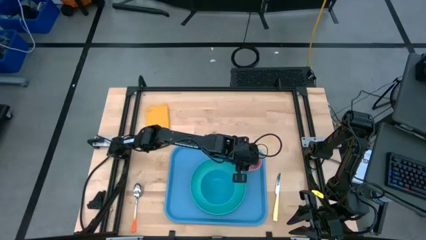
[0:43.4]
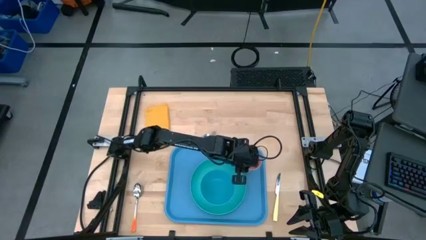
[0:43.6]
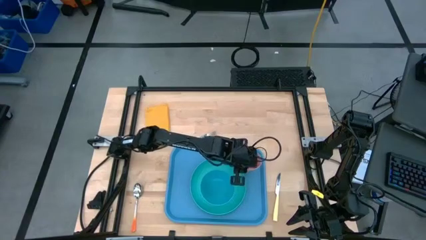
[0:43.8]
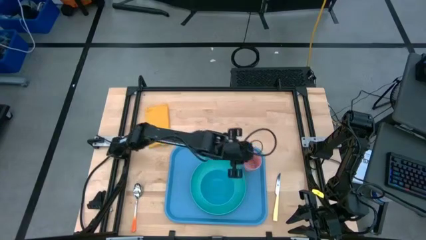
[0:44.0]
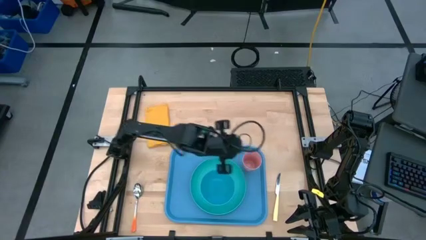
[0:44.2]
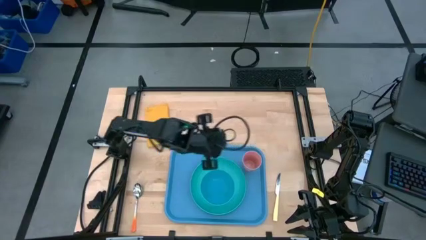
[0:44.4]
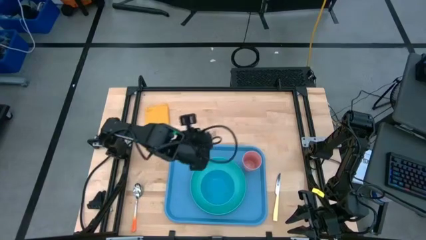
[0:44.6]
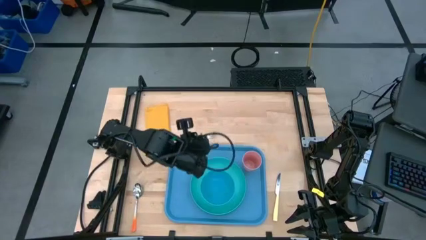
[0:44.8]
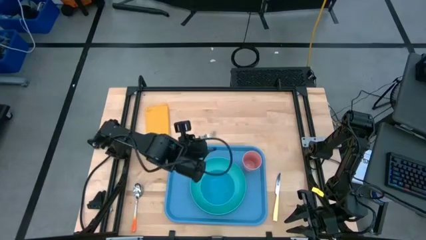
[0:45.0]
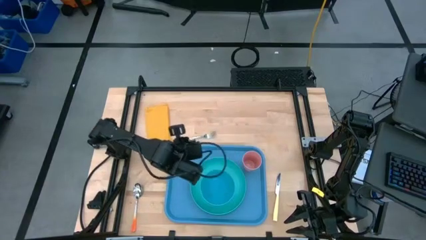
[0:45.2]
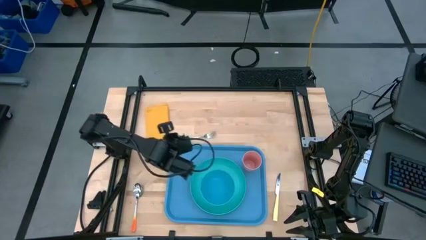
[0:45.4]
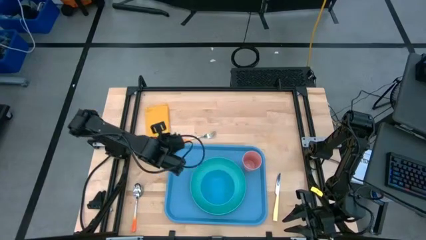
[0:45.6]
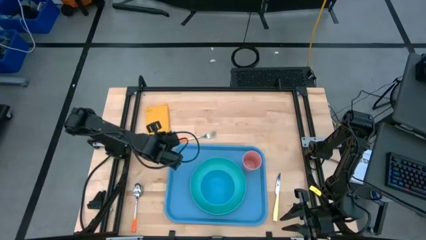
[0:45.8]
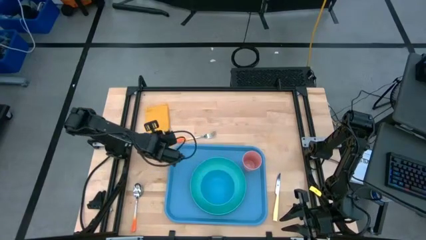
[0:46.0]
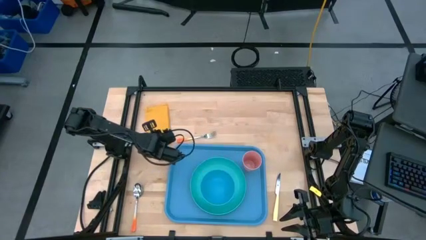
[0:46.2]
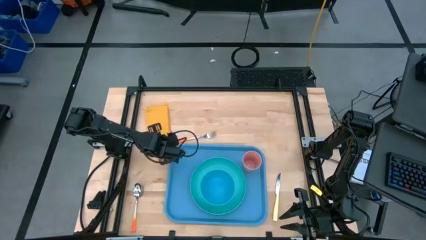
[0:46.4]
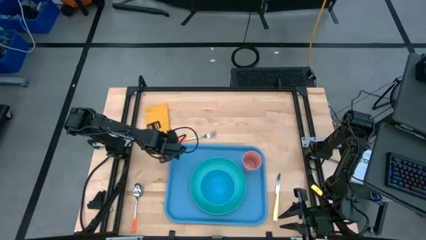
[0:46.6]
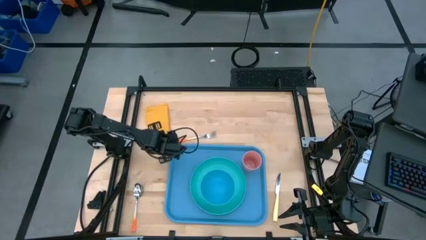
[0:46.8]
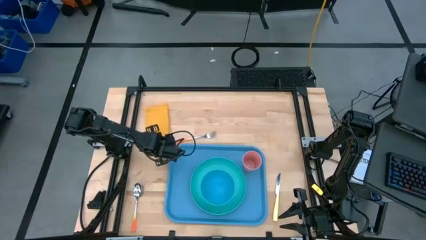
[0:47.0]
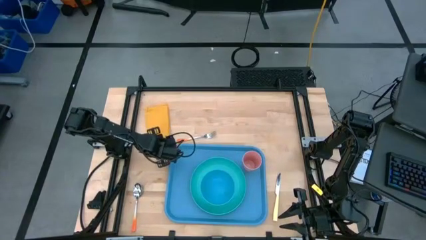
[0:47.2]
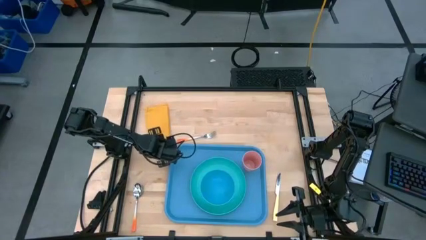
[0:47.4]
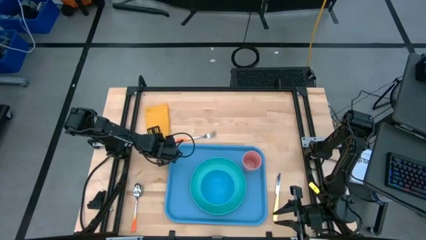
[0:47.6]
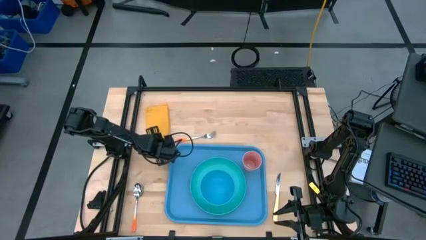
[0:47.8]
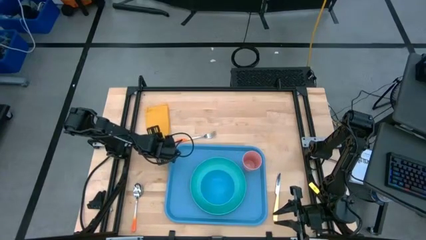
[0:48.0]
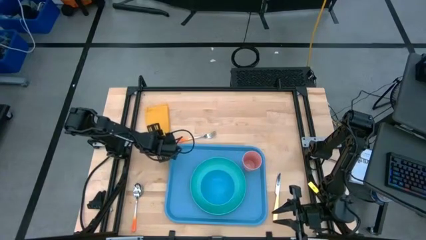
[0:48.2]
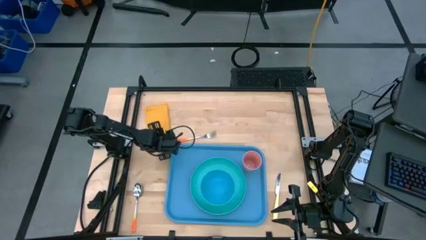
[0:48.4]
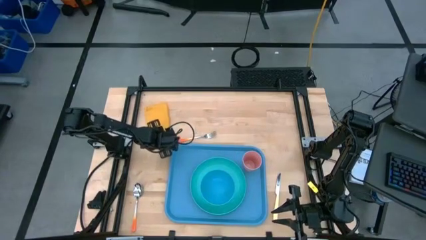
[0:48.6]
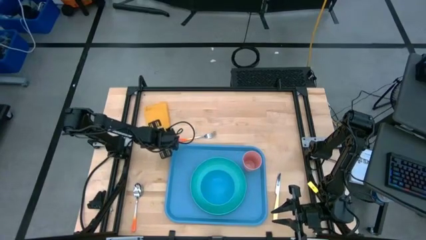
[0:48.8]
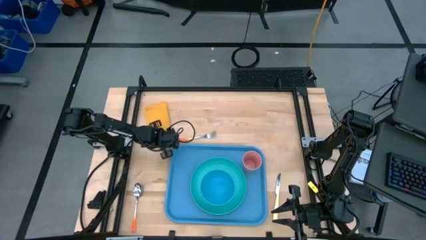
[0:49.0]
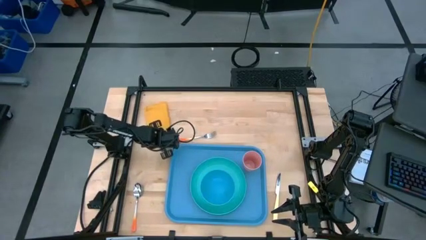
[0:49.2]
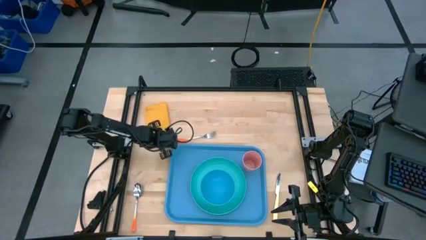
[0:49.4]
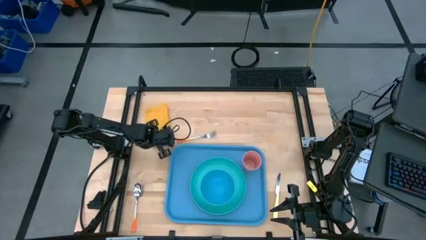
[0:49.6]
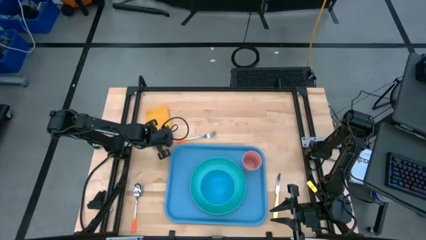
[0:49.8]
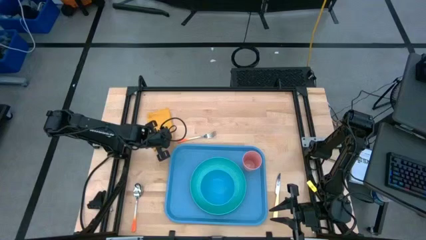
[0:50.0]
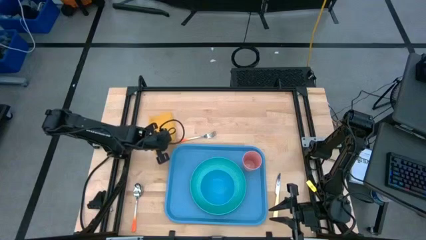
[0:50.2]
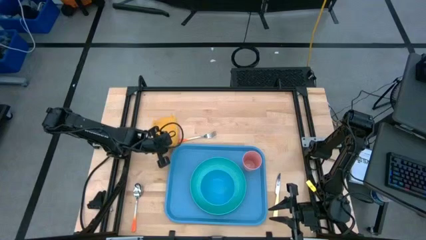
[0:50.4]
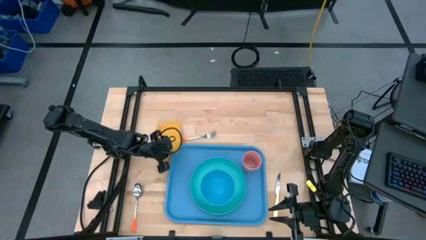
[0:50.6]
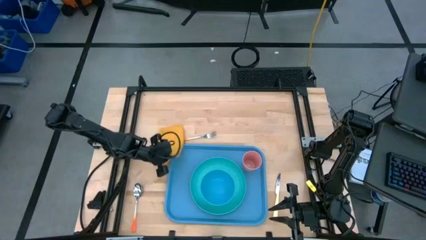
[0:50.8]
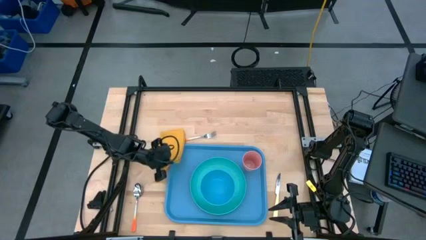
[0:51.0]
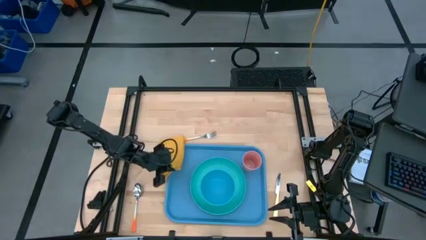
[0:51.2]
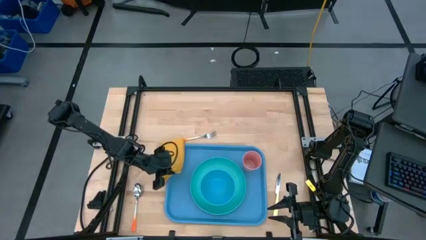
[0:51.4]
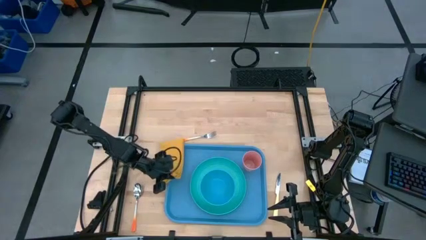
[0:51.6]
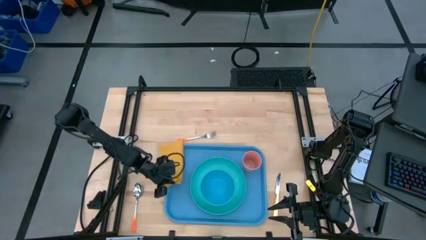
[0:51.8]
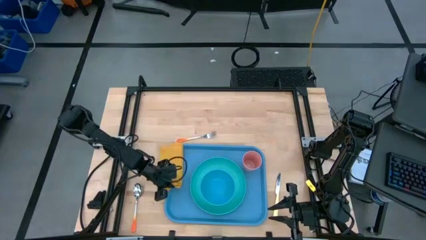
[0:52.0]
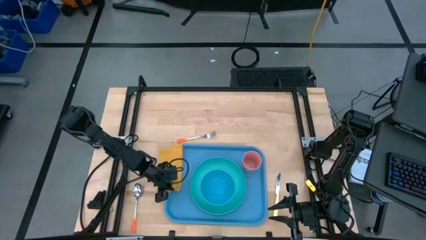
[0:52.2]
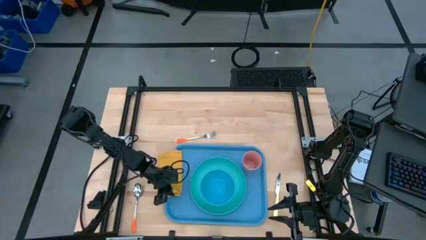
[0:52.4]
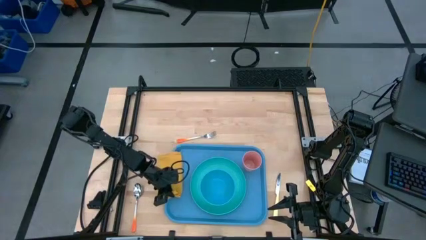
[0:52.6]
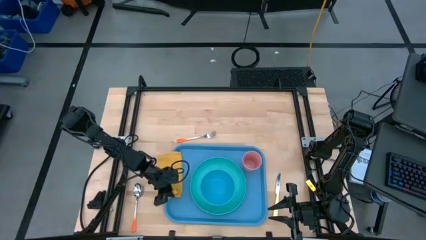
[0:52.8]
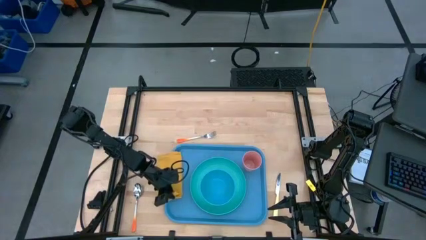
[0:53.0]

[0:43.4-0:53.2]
Task: Set up tray
Put the yellow napkin on the blue serving tray to the left of the light blue plate

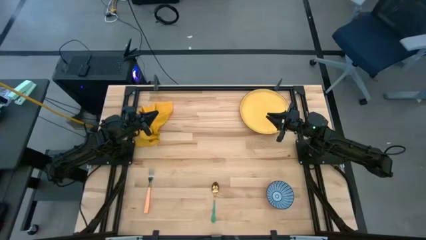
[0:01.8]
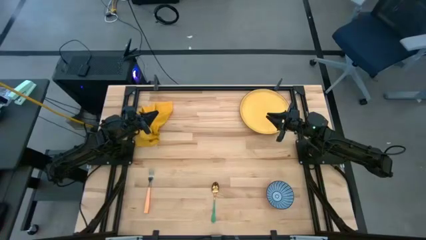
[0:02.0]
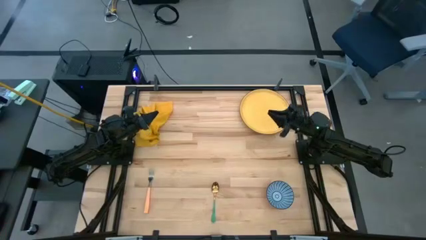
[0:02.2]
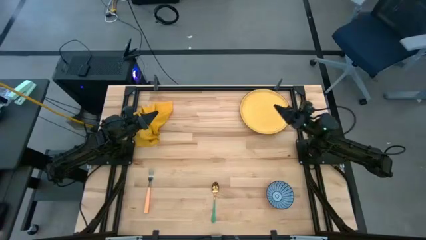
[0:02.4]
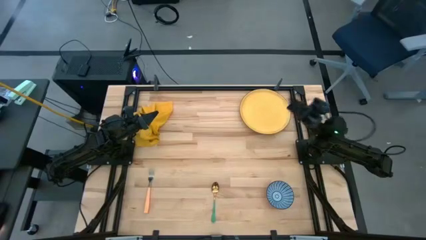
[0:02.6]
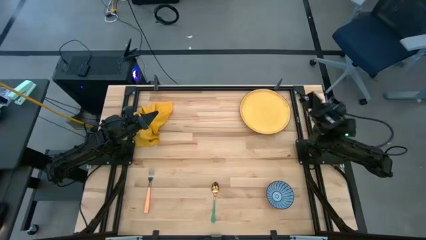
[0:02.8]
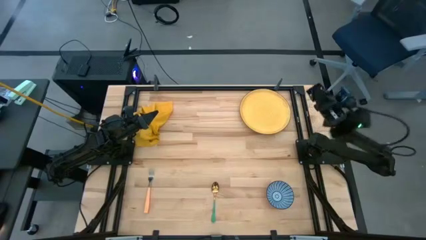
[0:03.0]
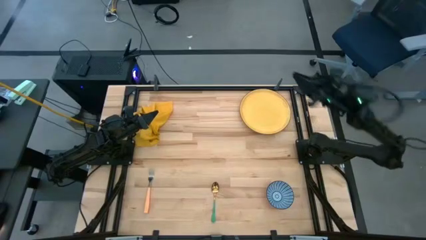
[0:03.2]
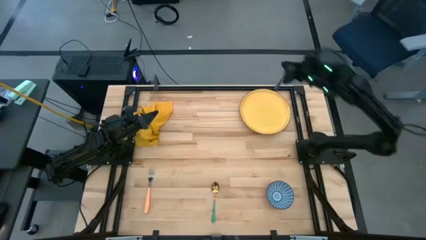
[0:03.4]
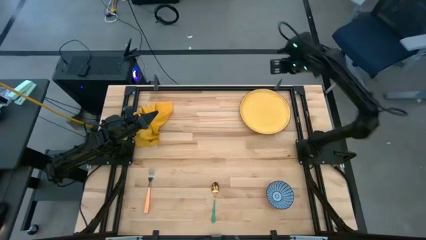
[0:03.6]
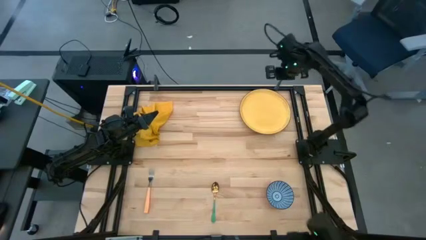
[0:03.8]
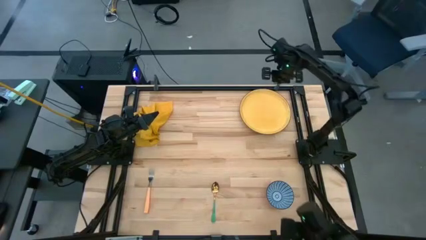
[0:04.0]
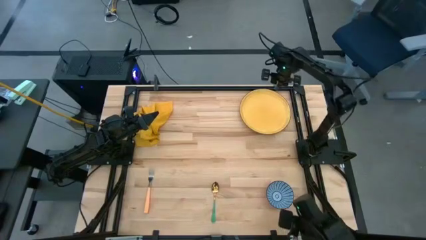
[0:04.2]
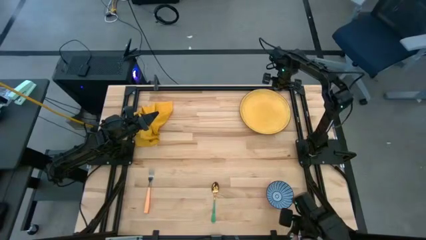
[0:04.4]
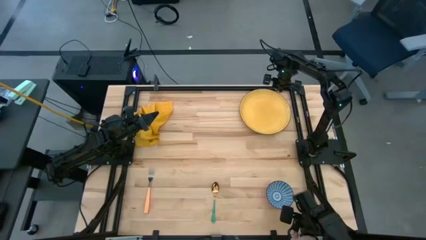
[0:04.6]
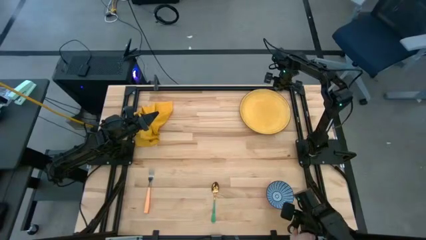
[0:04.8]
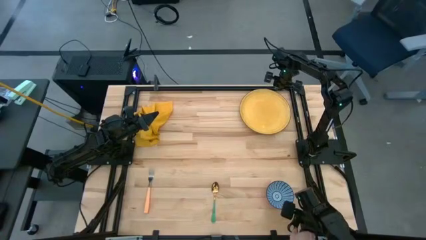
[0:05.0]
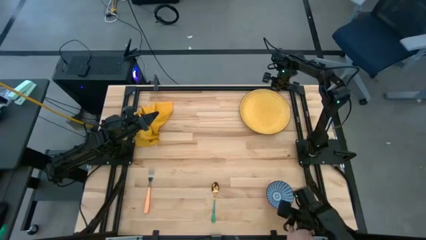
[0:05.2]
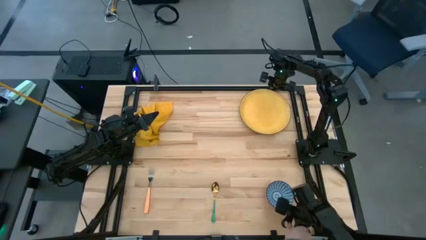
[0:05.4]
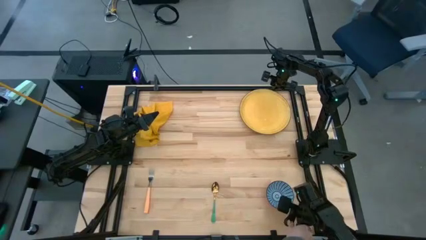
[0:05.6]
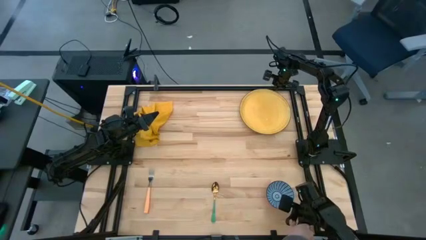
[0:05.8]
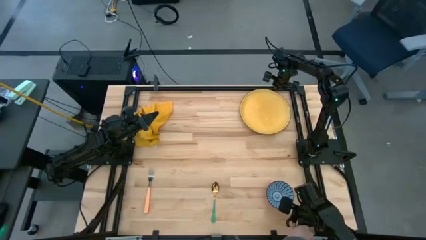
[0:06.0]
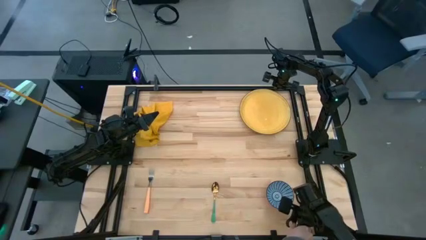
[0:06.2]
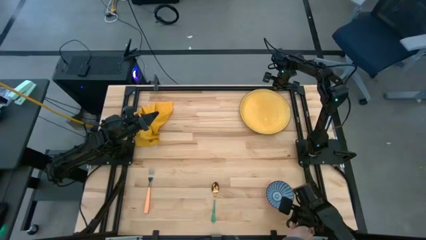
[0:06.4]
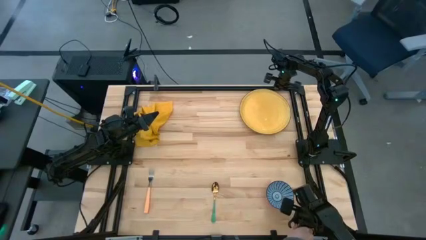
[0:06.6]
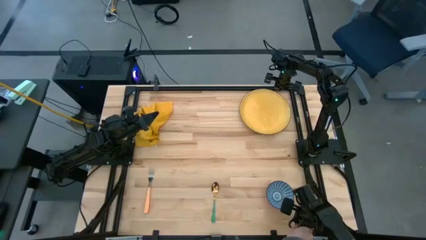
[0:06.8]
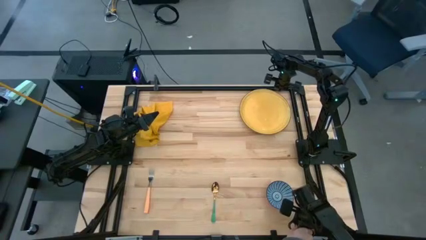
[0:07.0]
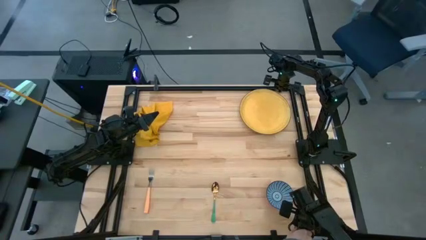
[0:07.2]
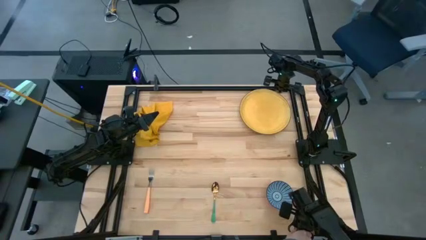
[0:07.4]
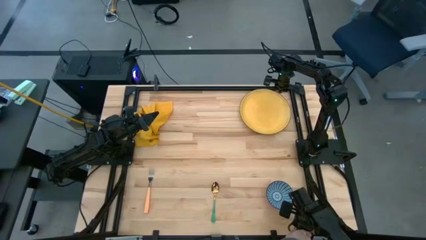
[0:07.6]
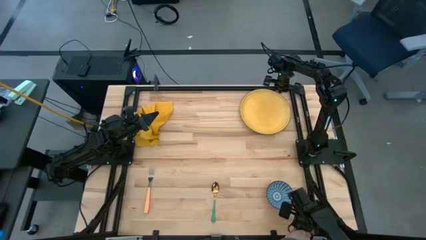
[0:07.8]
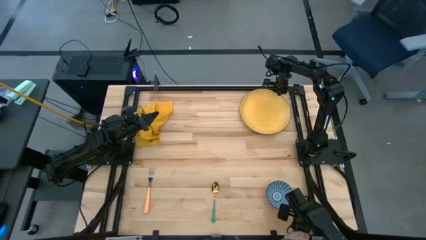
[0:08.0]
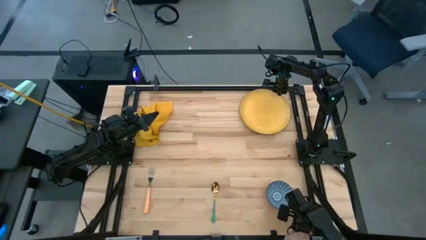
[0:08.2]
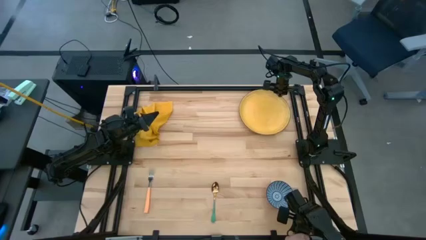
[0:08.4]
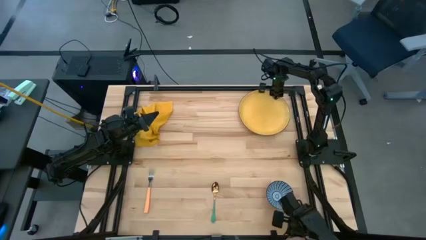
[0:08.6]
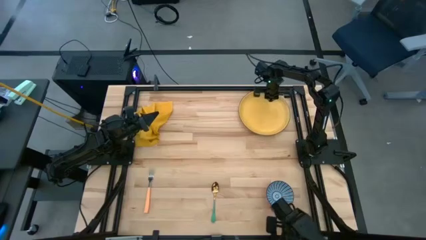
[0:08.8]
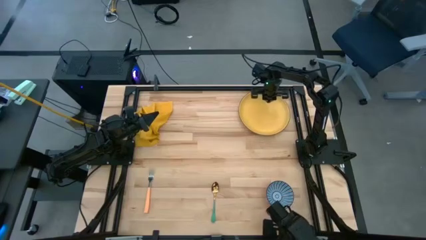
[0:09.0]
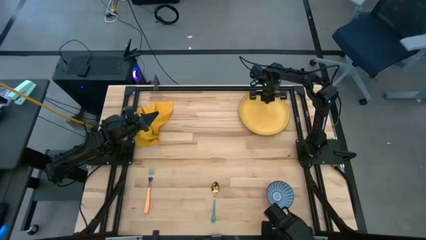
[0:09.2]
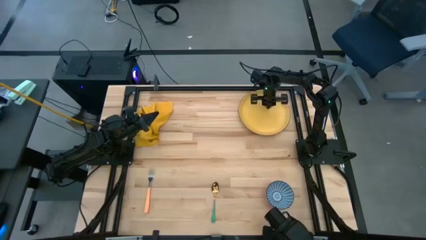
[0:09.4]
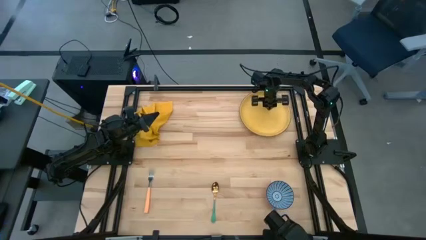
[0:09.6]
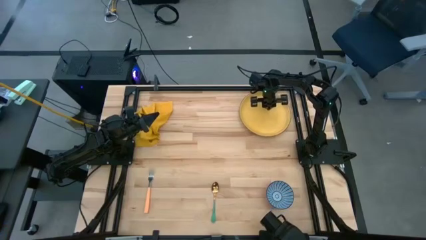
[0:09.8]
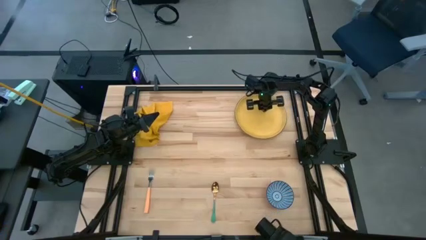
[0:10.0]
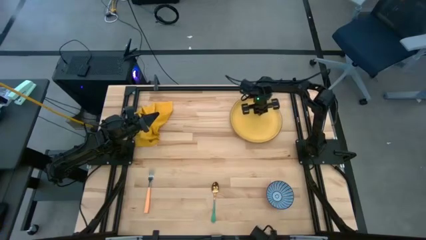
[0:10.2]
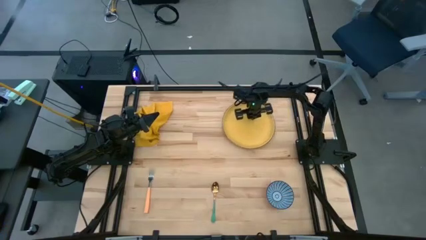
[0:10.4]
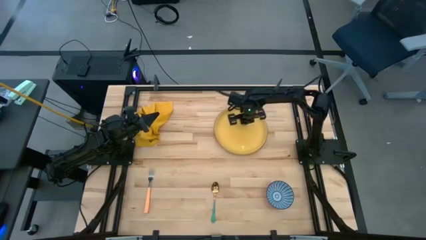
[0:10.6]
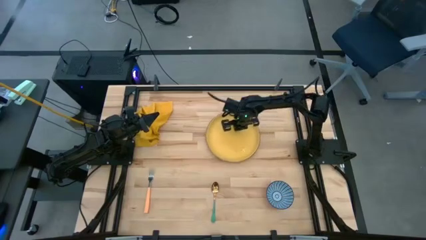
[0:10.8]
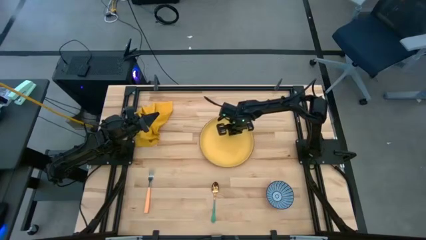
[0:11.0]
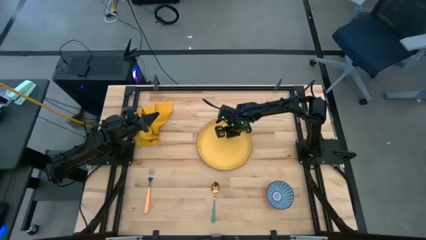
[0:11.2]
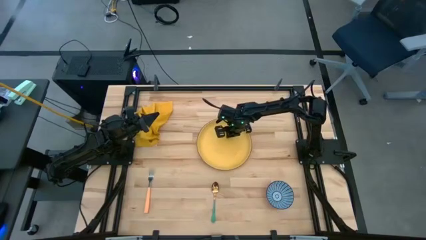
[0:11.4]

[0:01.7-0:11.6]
Task: Set table place
Move the gold plate to the center of the table
